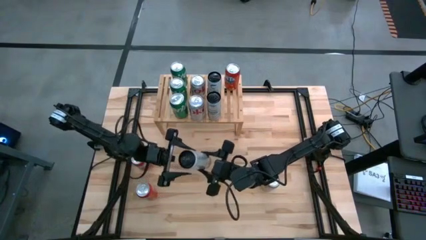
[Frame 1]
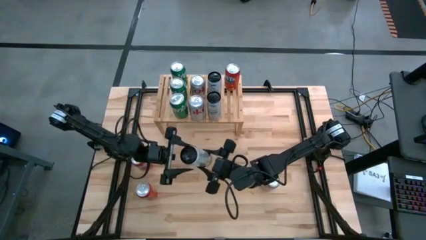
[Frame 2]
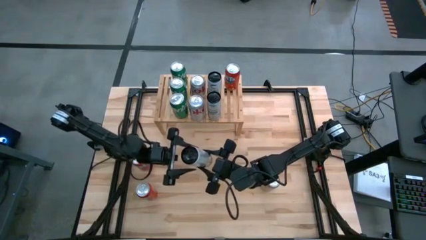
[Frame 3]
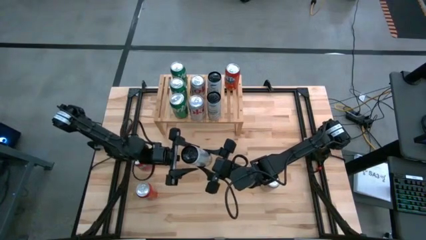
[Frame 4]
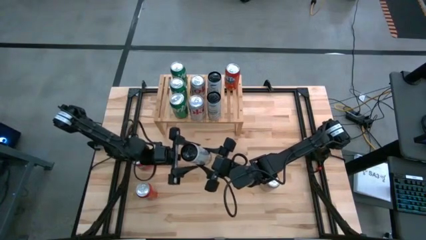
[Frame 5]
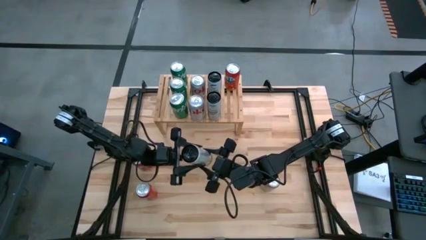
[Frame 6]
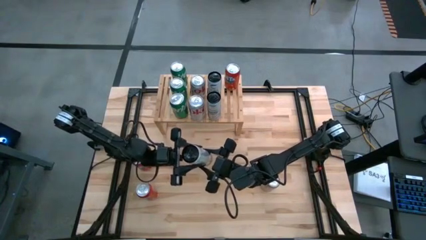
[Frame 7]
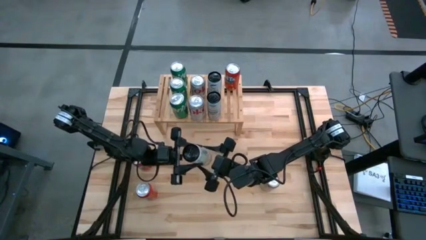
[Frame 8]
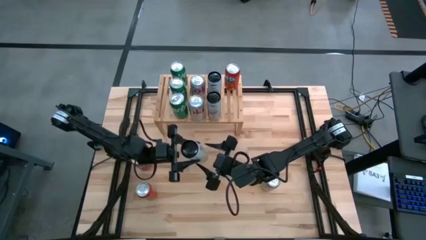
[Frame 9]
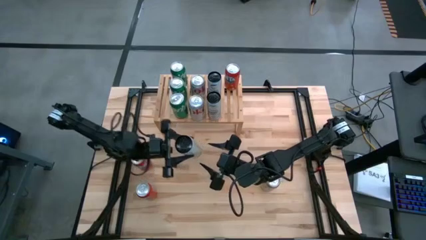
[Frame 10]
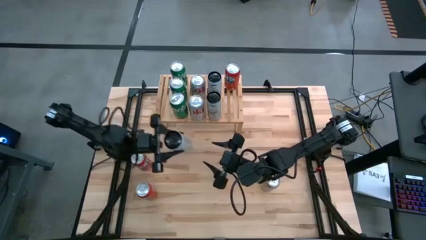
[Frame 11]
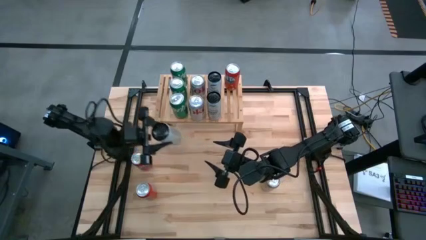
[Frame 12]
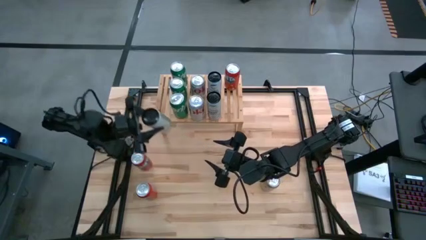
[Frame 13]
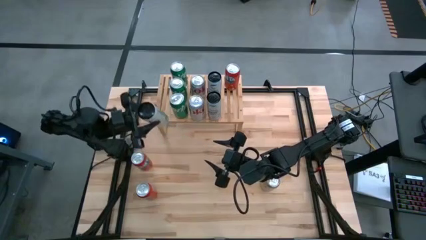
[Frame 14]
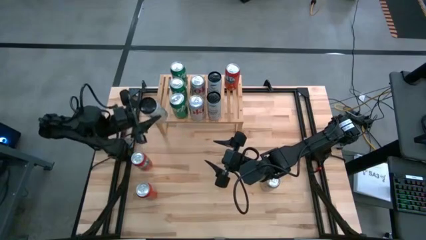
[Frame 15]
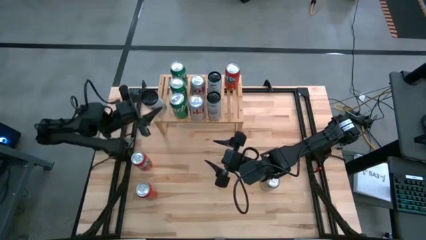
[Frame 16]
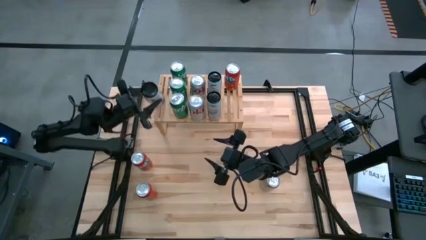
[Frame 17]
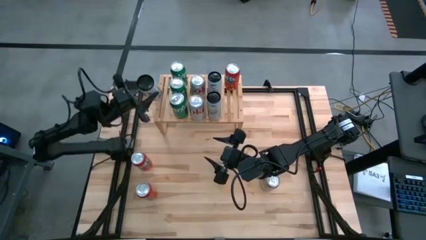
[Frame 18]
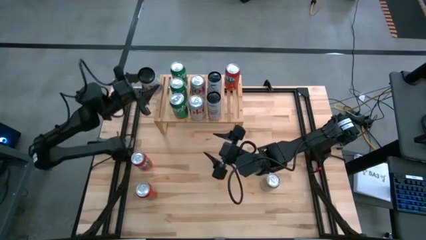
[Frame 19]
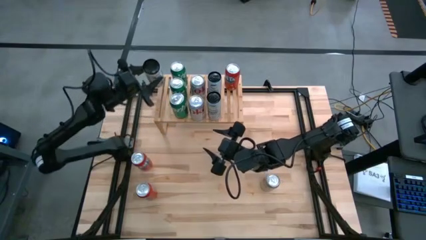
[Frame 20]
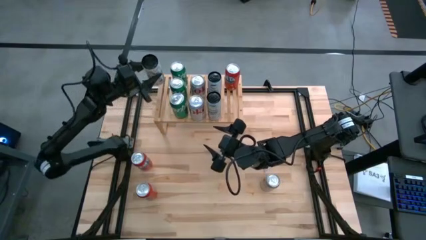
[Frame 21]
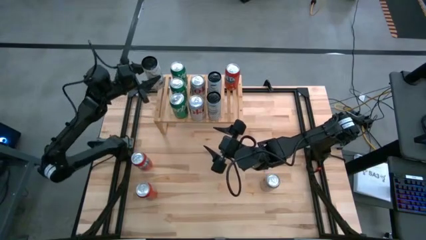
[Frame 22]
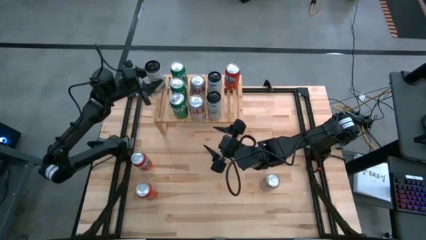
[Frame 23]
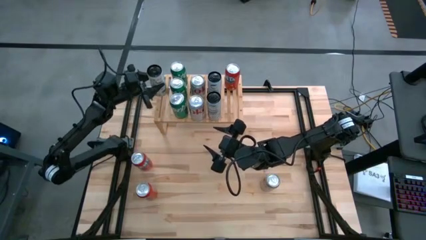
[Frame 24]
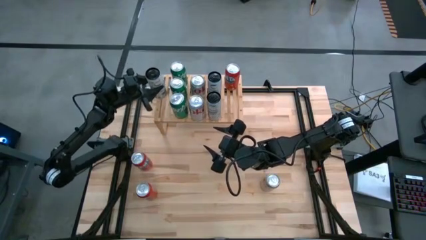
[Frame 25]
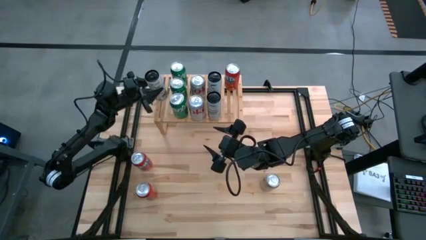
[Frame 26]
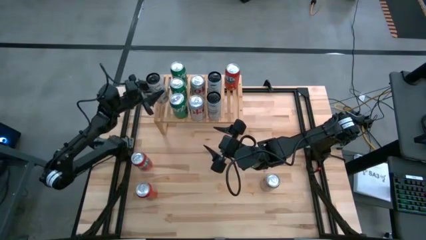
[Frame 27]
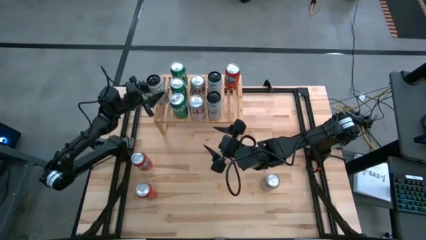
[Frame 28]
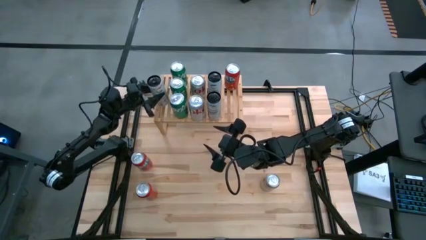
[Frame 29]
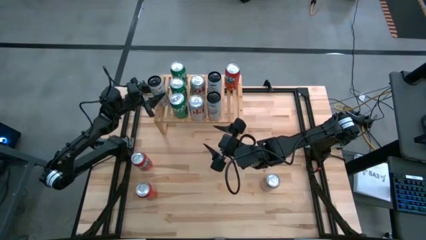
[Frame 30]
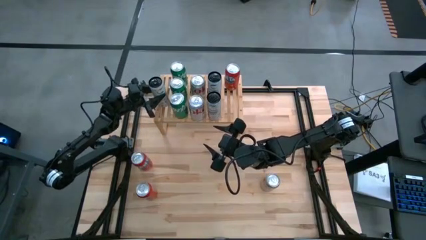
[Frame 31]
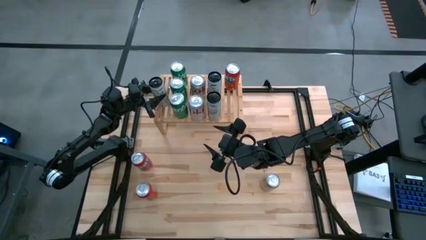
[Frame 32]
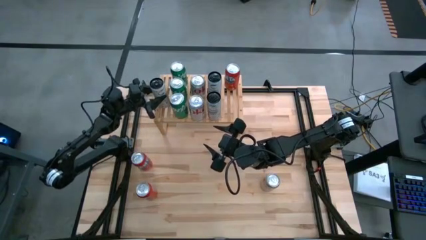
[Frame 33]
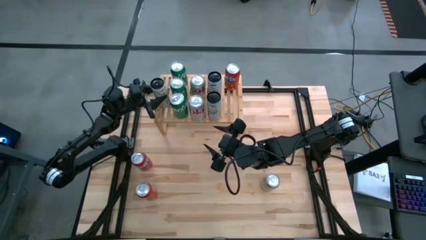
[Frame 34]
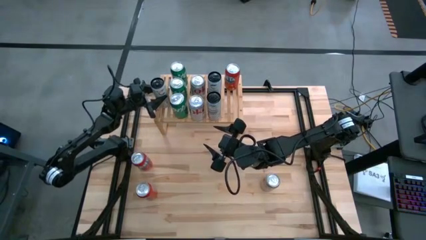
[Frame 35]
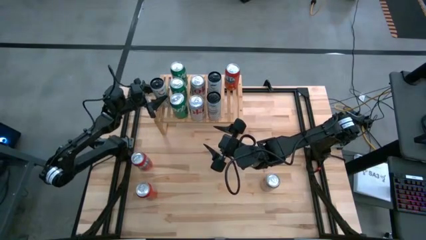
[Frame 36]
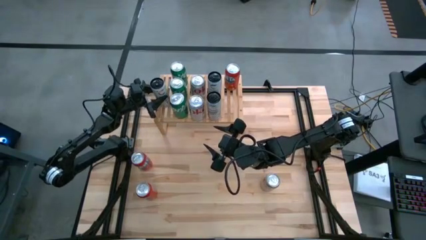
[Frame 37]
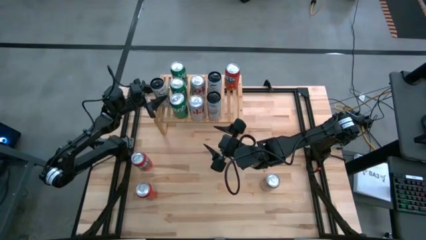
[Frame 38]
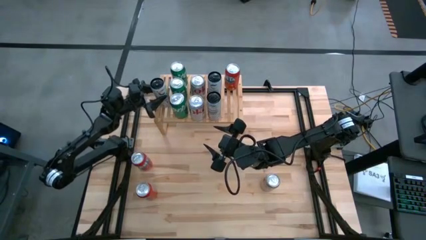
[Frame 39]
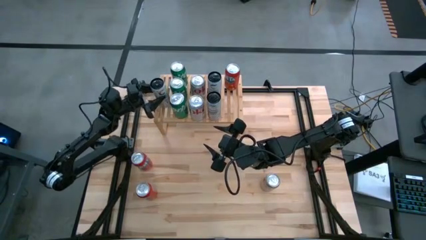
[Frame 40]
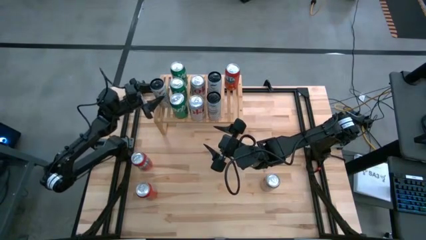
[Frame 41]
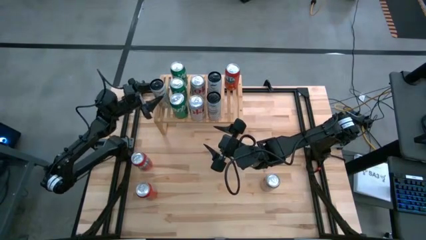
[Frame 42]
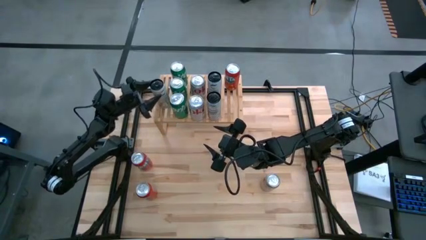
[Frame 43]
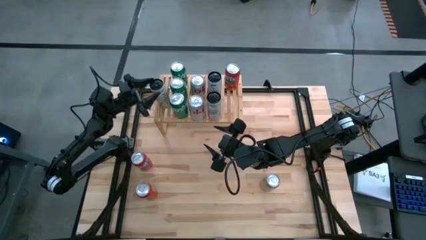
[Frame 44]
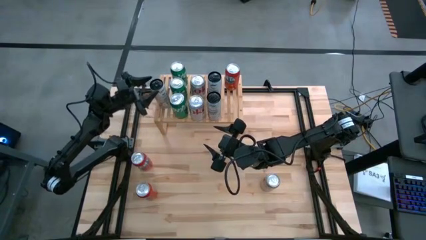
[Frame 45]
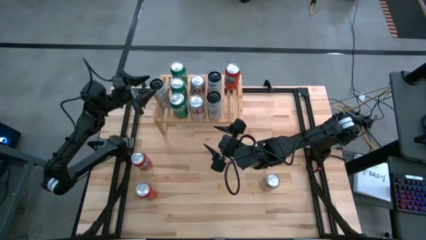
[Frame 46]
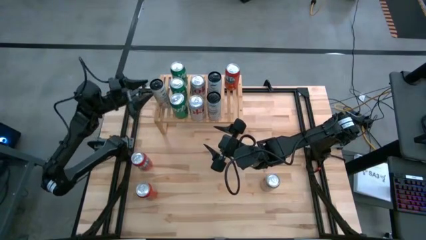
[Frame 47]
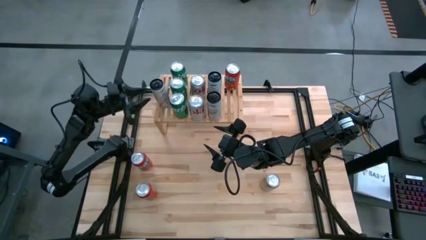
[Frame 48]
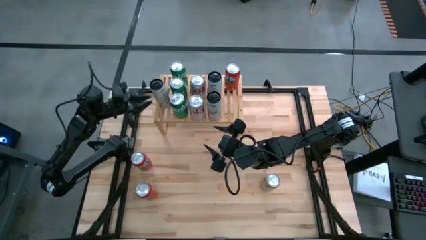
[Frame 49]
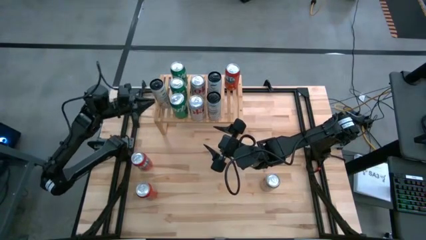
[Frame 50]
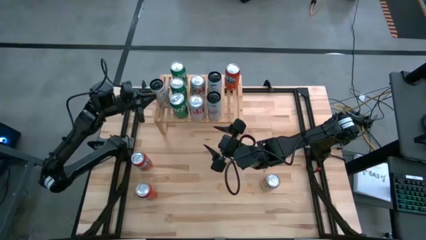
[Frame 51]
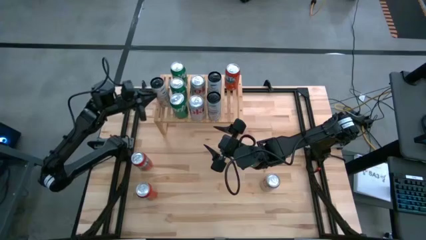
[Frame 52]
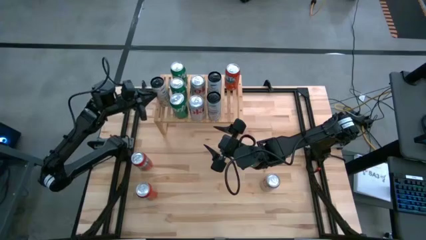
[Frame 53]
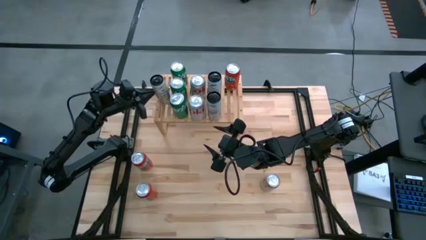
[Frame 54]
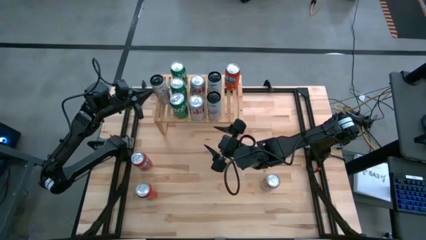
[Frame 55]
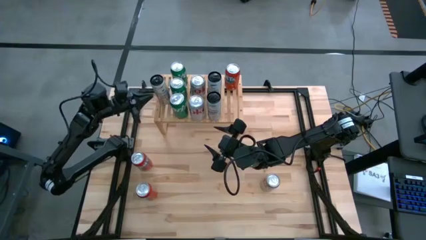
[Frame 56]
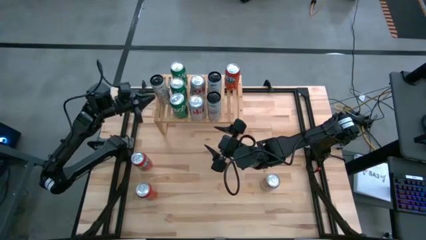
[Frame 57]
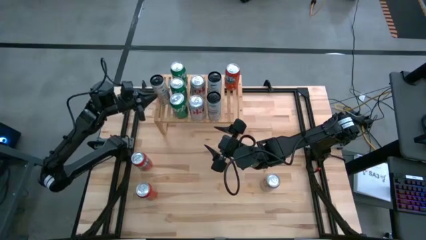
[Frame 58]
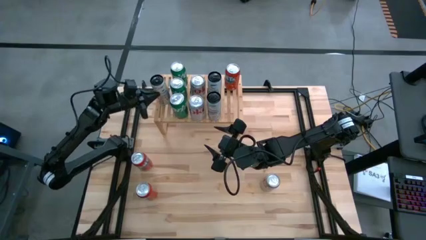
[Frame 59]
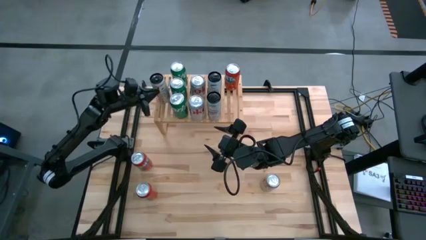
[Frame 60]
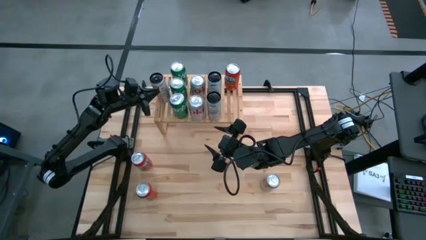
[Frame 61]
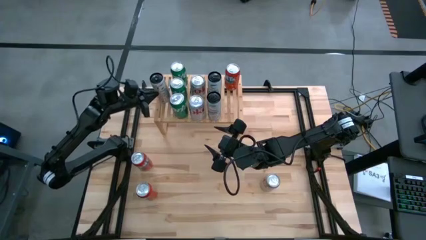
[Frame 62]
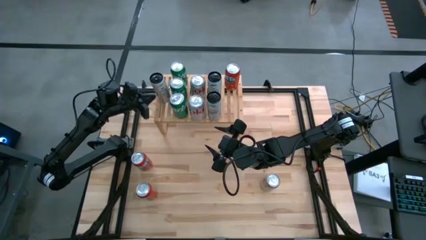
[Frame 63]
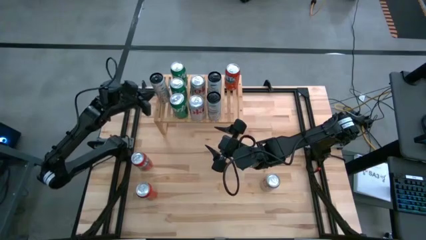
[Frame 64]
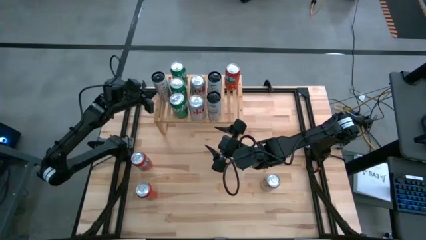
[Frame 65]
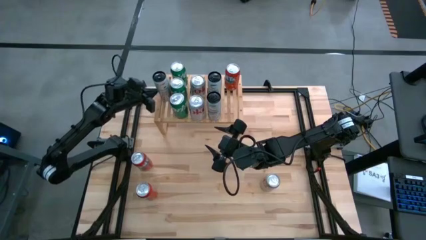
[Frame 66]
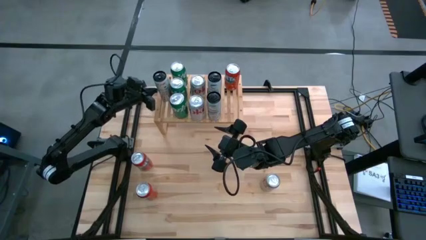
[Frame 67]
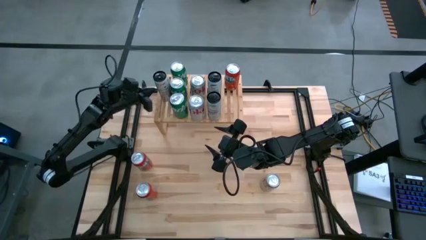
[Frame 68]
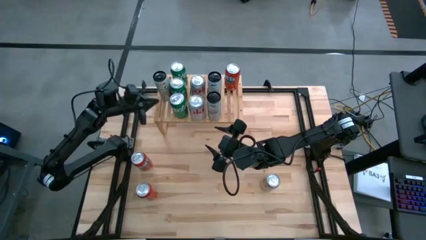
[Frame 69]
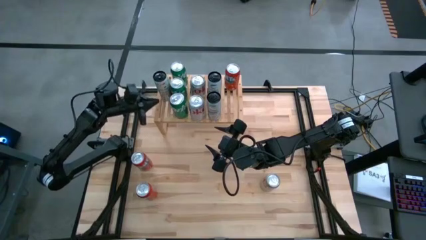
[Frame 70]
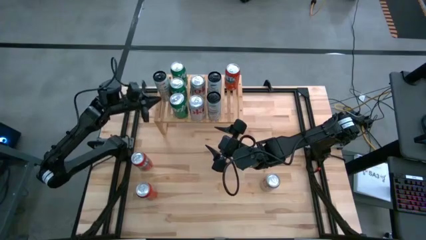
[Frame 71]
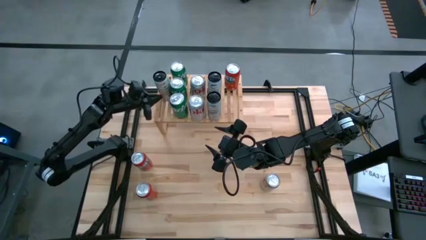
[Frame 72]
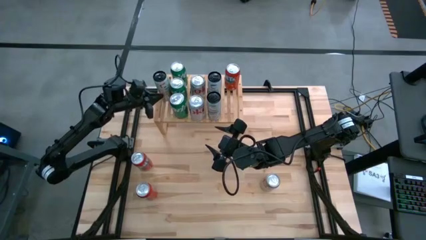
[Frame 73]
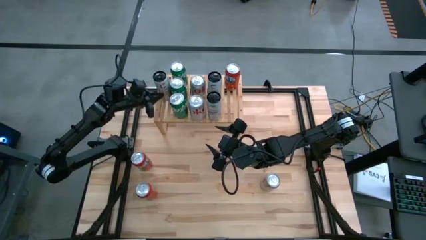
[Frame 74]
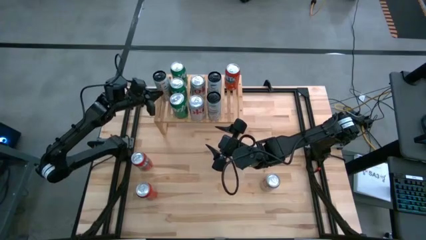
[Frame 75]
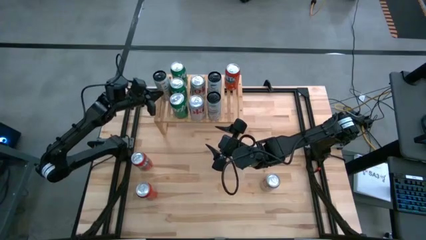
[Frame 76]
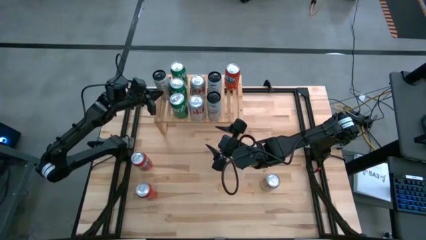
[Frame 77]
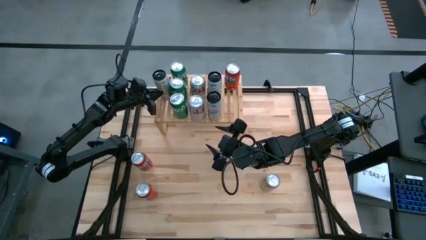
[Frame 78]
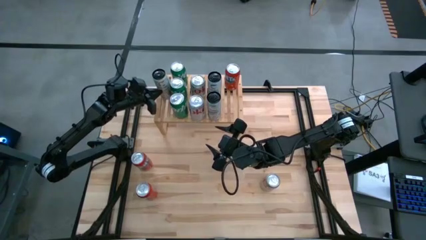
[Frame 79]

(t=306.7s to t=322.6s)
Task: Place canned beverage on shelf
Put the yellow soda can on the shelf
